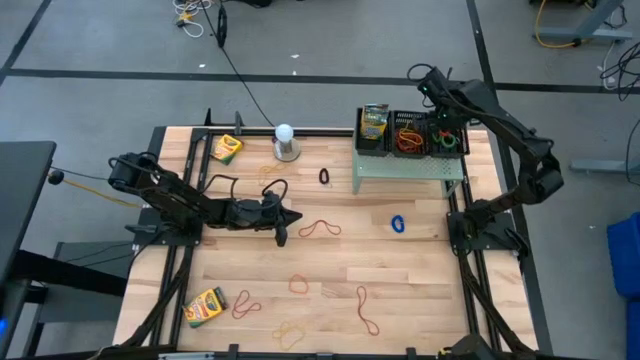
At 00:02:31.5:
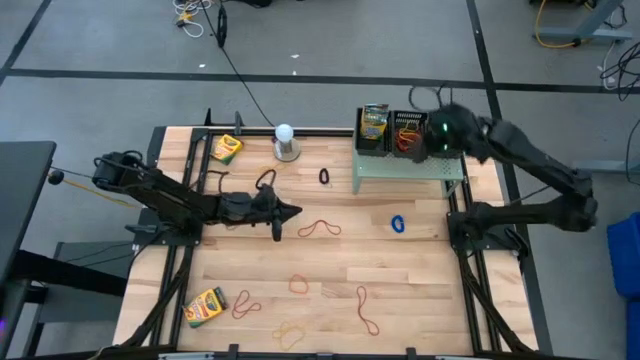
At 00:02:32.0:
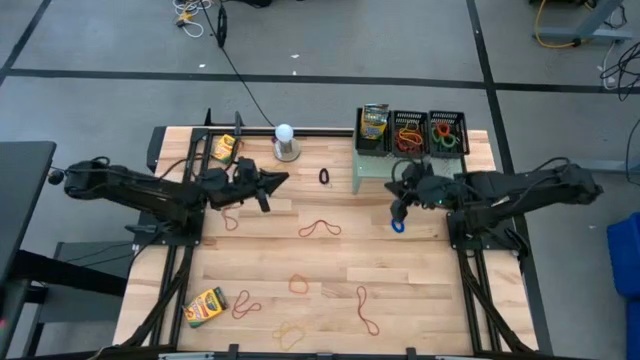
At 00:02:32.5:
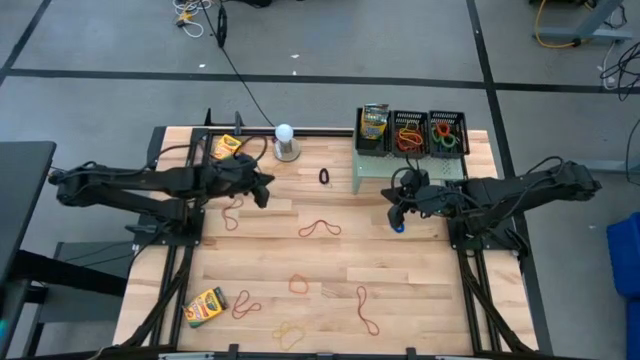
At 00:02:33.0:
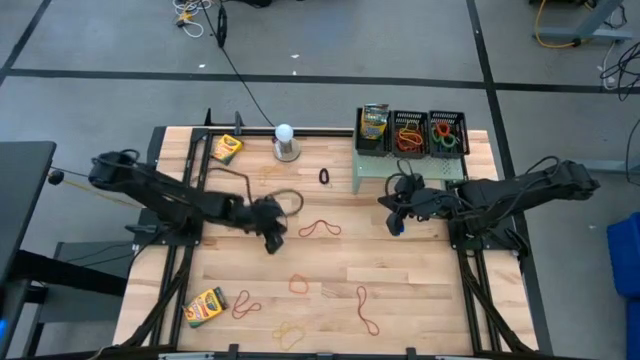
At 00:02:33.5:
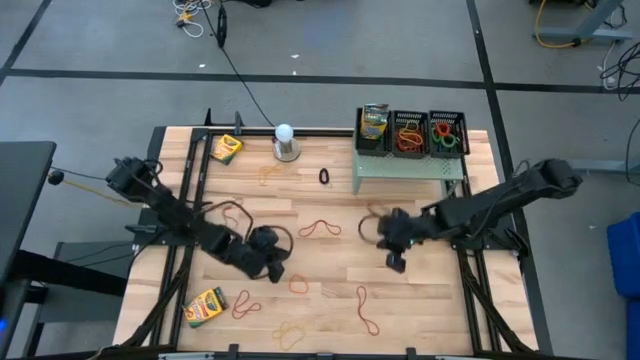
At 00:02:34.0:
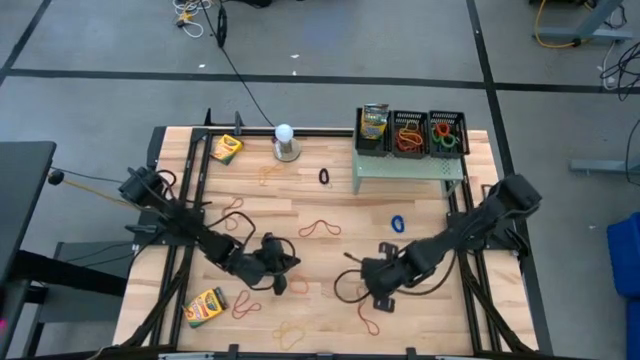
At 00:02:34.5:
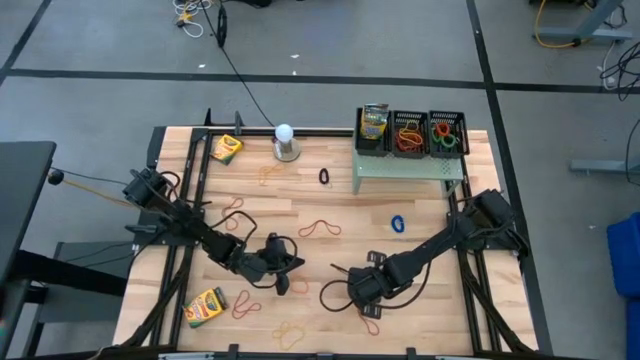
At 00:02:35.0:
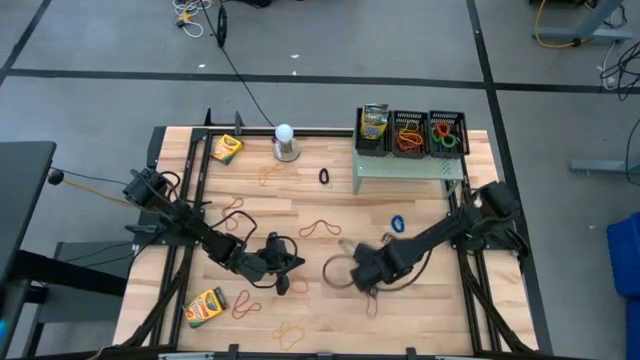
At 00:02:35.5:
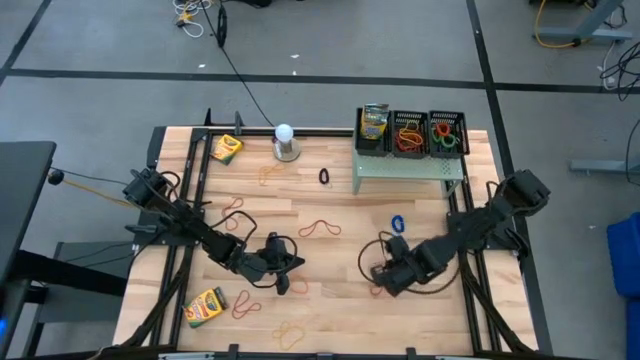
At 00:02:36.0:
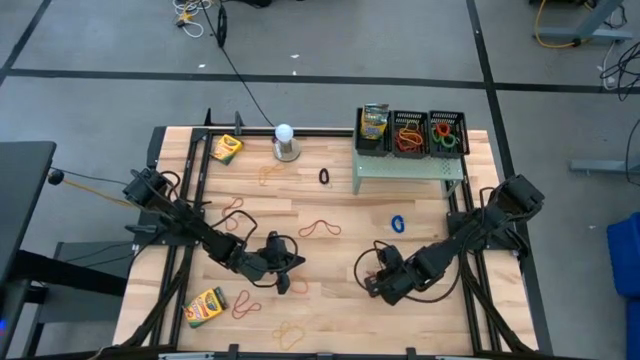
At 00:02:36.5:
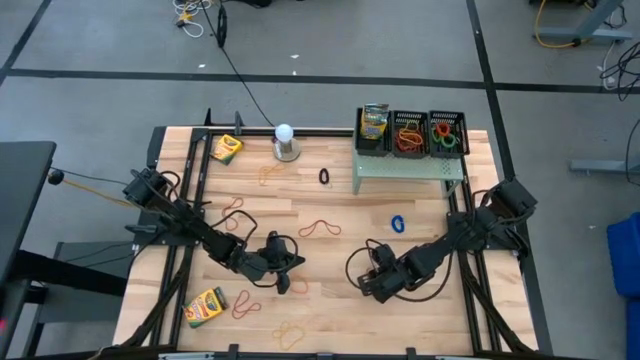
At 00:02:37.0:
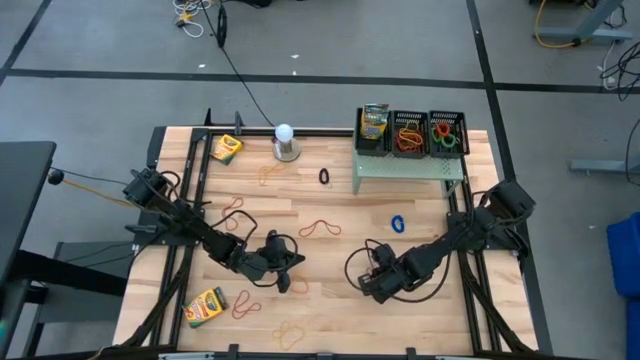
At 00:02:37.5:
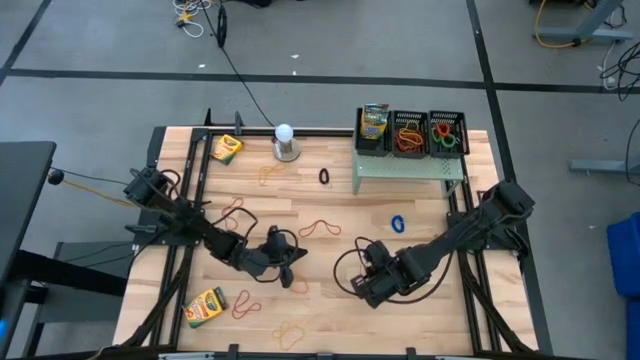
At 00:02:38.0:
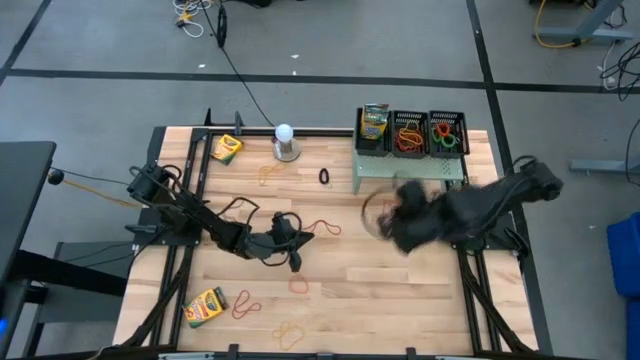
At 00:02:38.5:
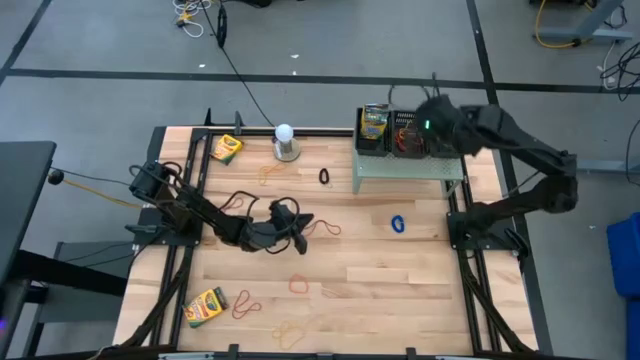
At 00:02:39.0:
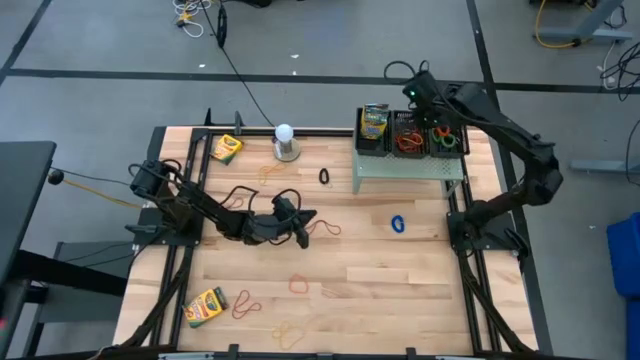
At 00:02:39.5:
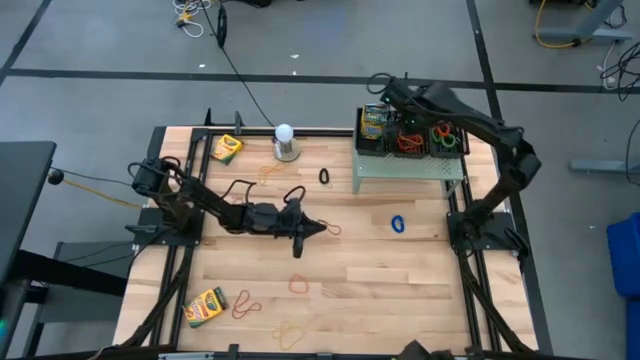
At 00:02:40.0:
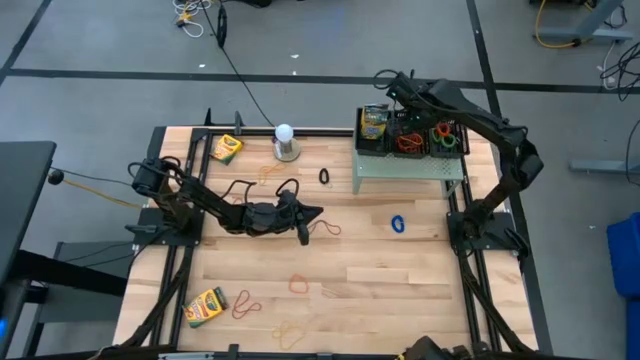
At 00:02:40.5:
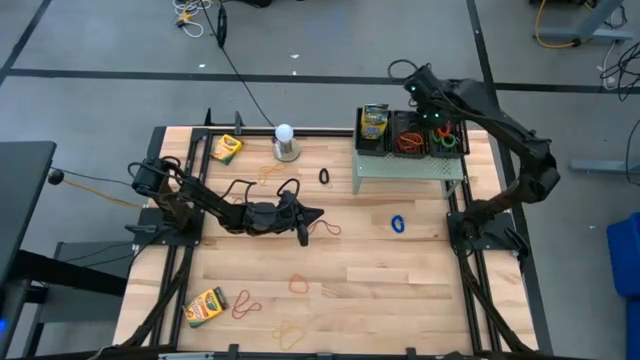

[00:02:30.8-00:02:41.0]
Task: Pick & Place Office Desk Supplies
Put the red rubber band into the middle basket on the shelf

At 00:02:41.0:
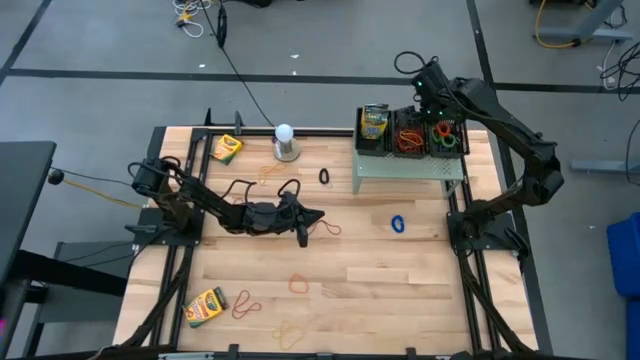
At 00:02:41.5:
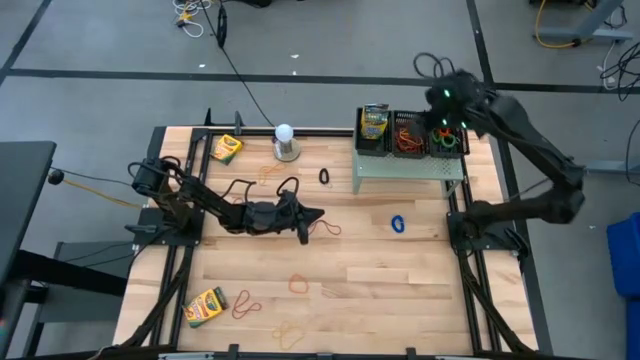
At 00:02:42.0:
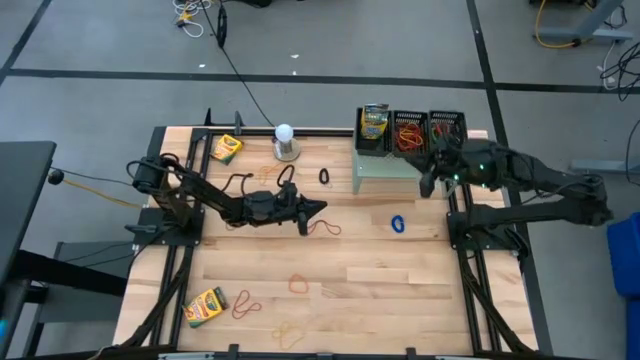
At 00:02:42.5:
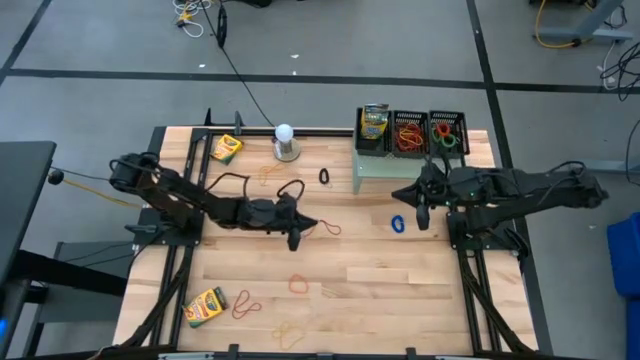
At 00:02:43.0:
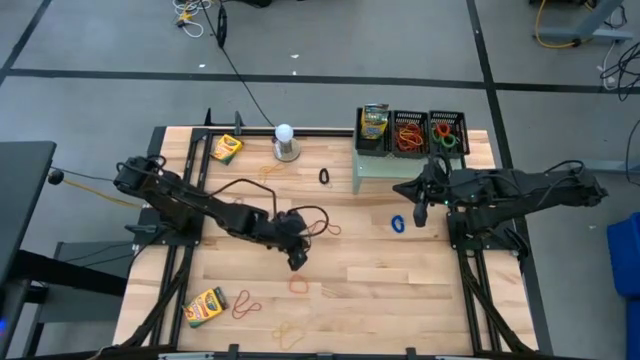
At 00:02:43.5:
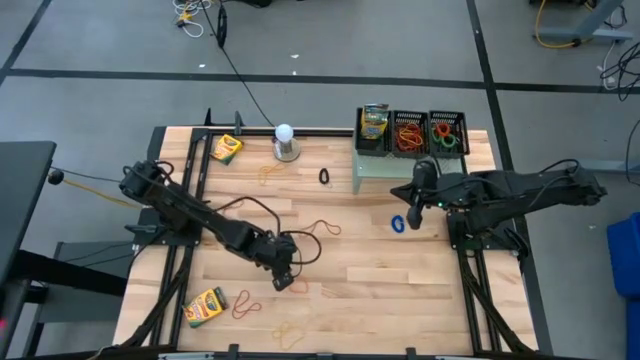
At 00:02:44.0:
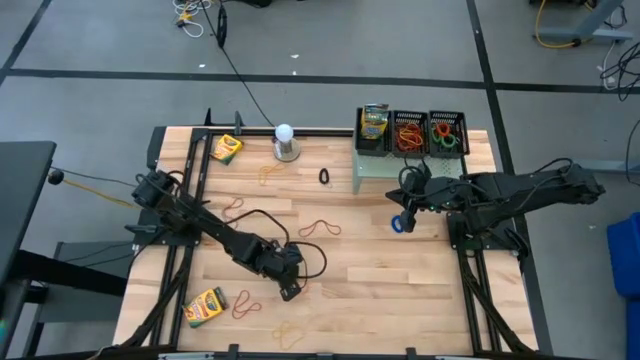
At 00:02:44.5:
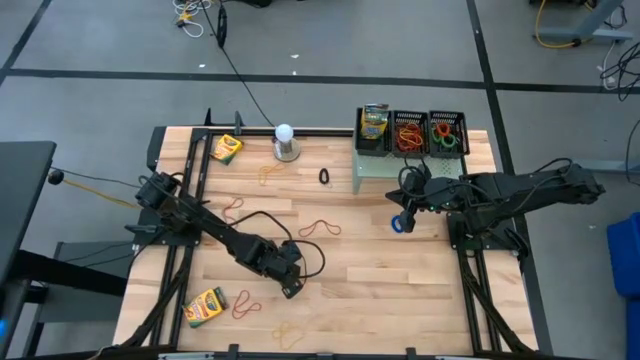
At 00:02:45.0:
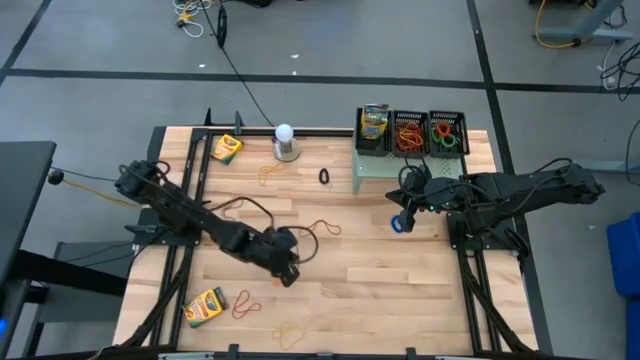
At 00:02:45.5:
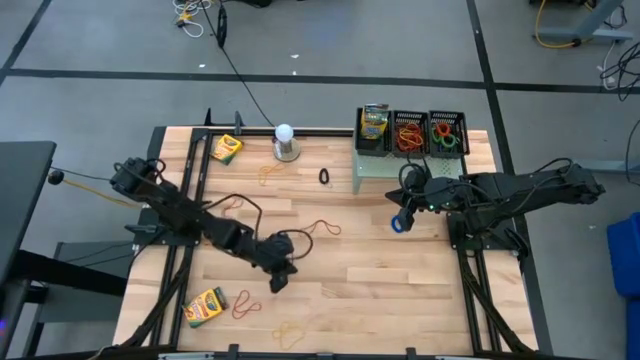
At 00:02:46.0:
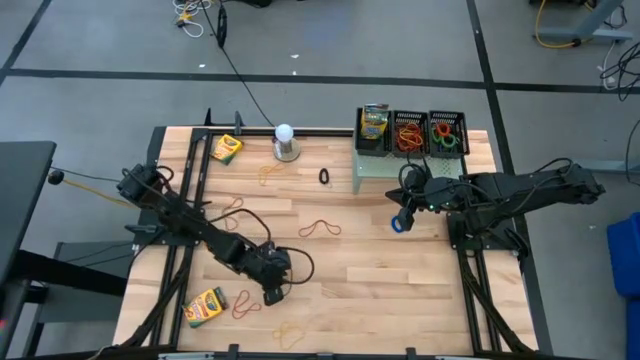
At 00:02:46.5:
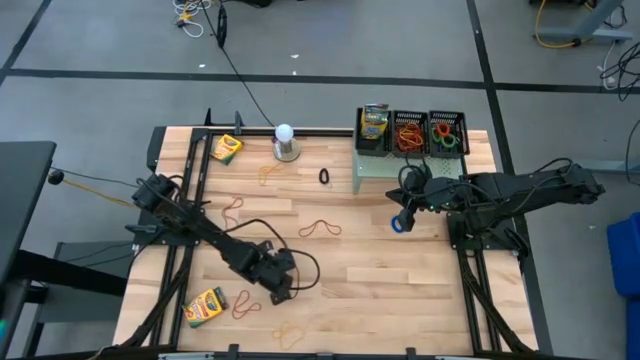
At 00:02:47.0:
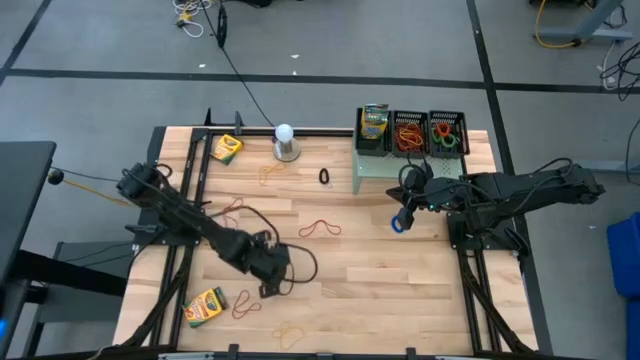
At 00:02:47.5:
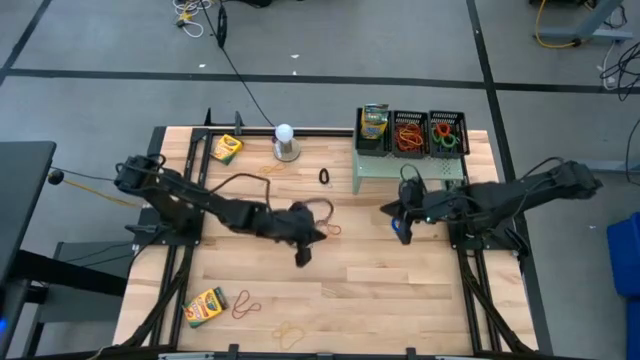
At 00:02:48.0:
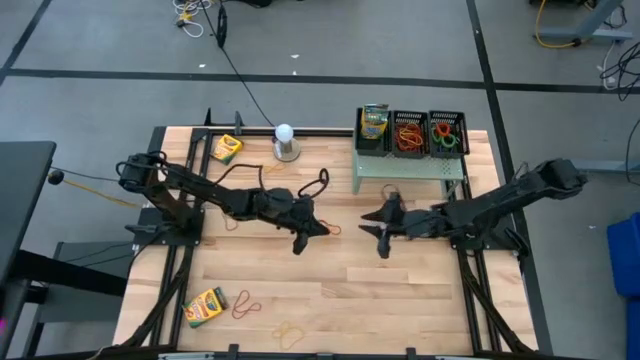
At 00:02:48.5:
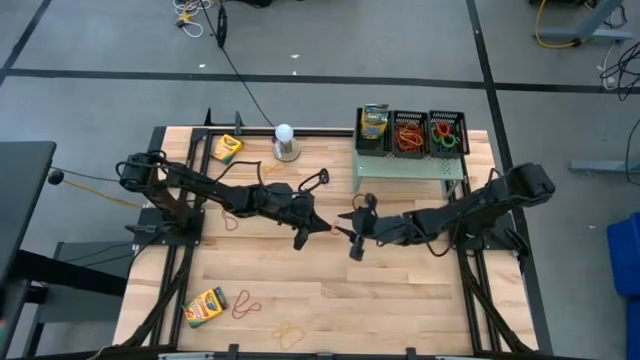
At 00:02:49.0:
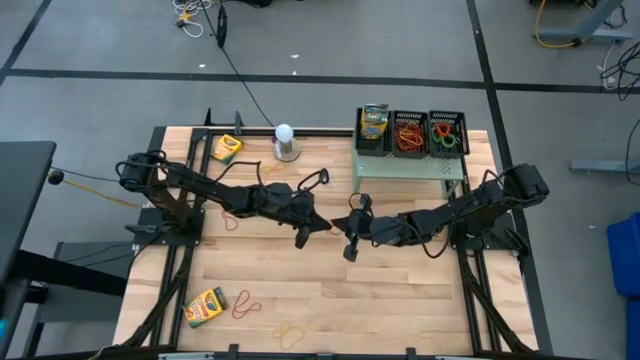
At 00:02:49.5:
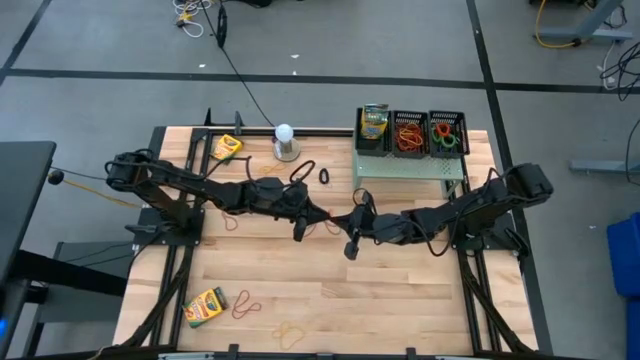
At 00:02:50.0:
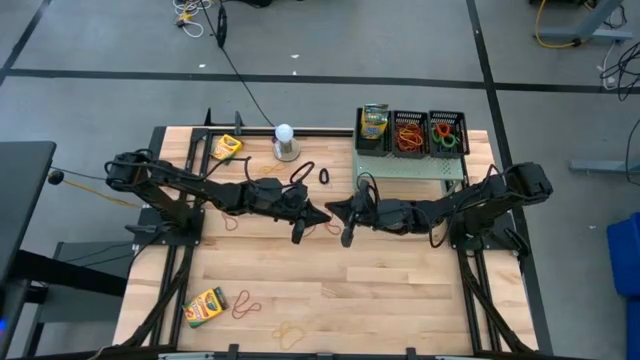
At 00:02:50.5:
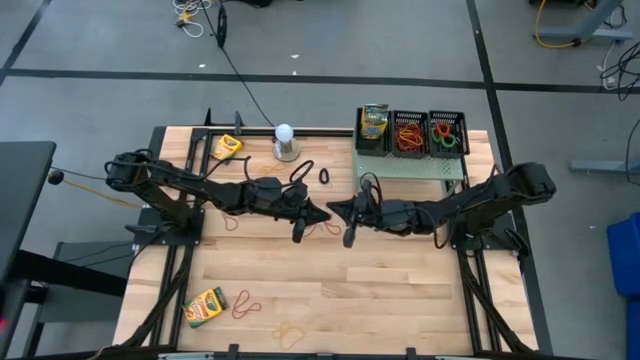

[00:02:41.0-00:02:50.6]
Put the bottom orange rubber band into the middle basket on the shelf

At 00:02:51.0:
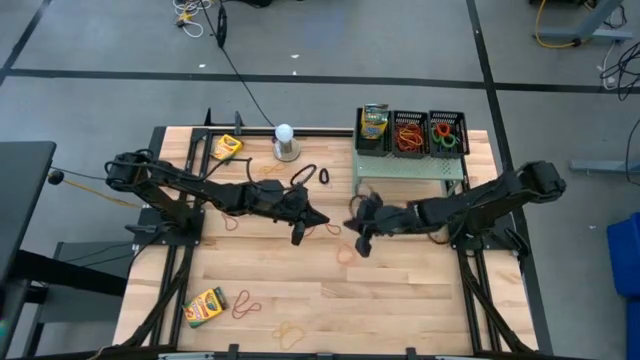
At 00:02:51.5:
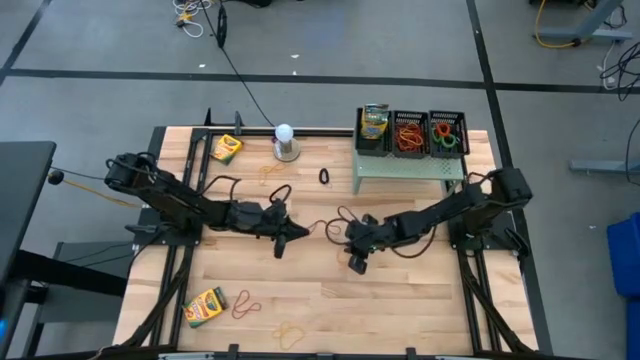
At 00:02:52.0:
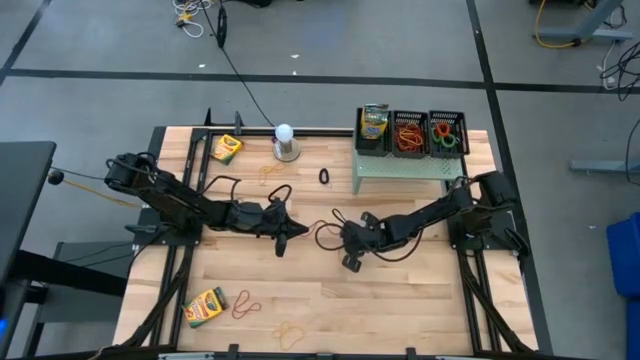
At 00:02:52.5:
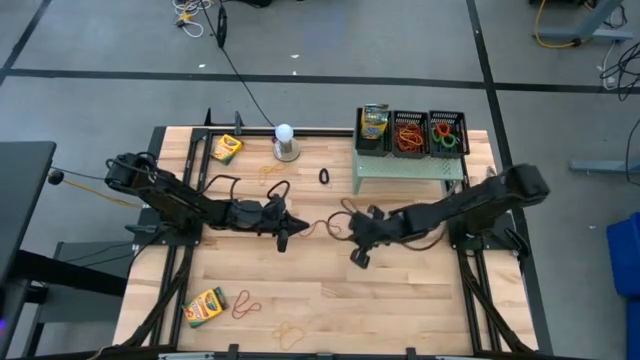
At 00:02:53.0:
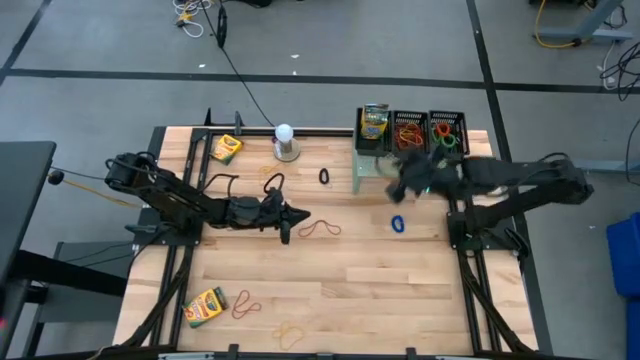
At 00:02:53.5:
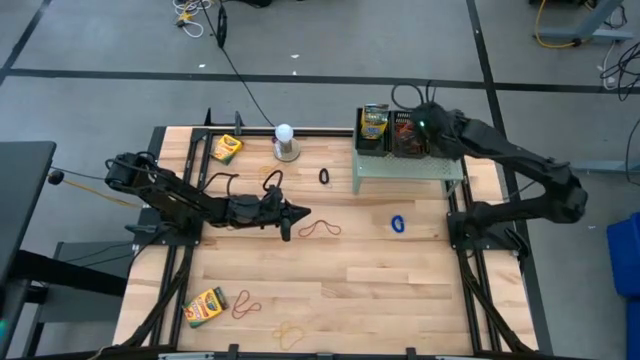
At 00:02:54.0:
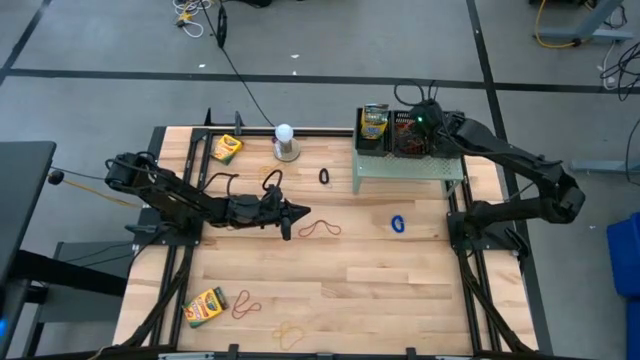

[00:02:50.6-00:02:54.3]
Put the bottom orange rubber band into the middle basket on the shelf
